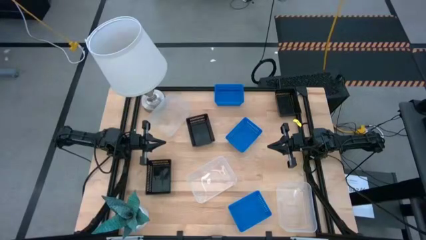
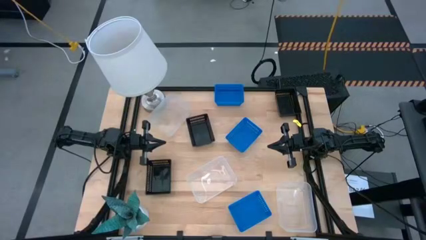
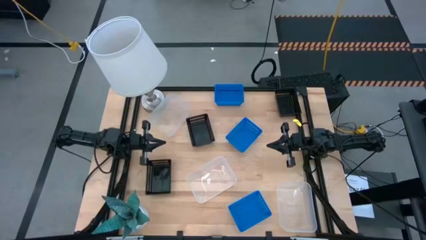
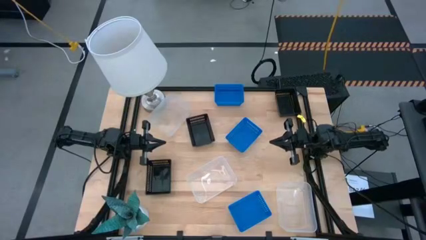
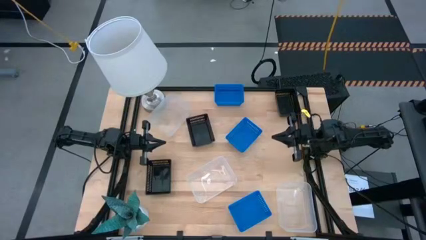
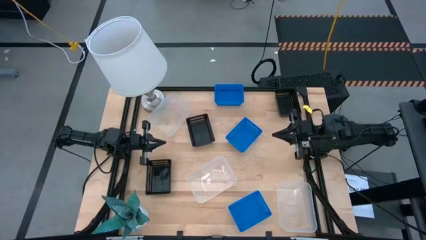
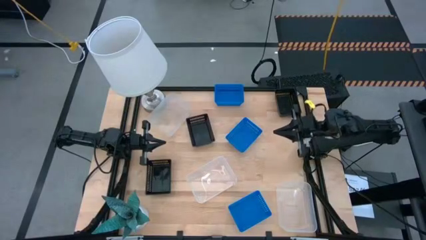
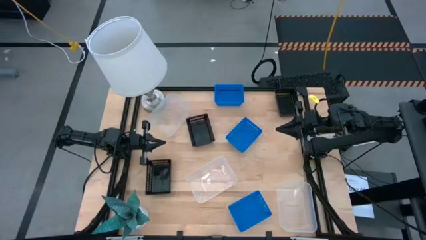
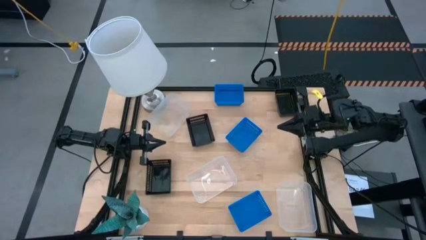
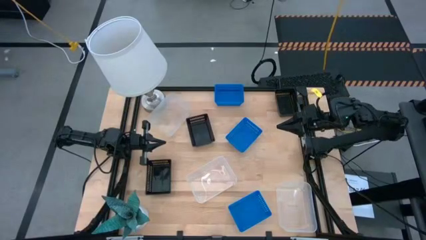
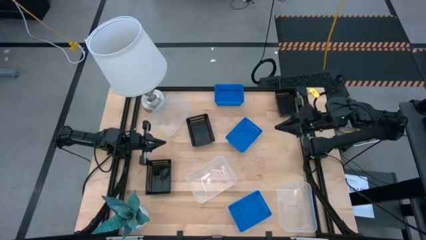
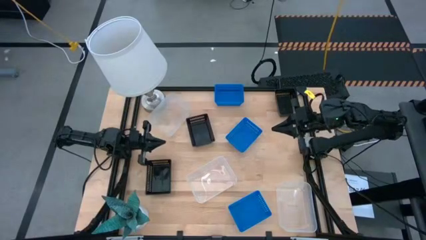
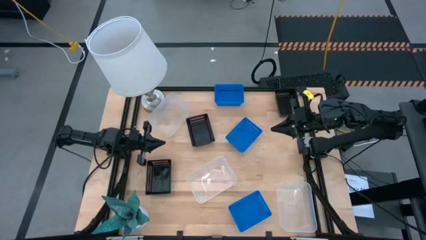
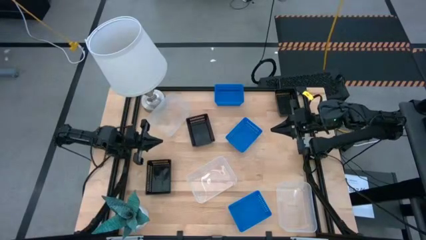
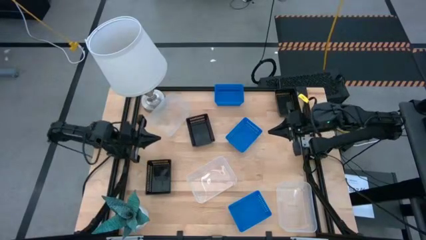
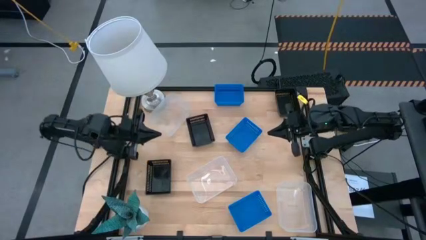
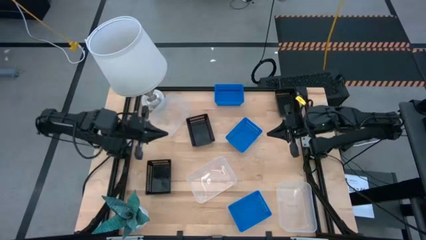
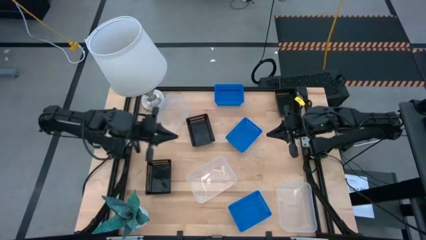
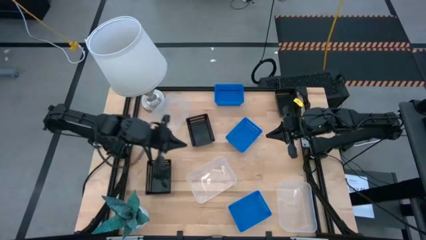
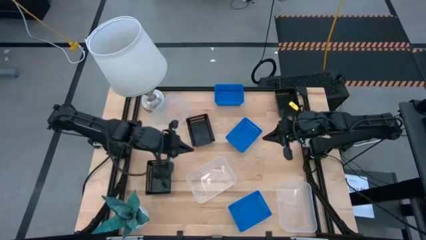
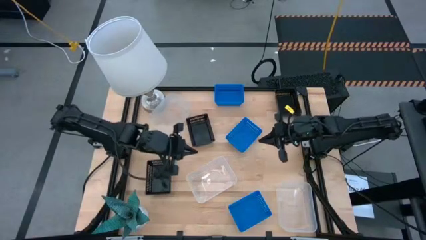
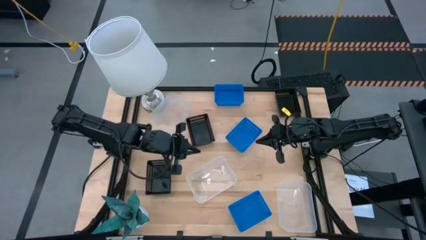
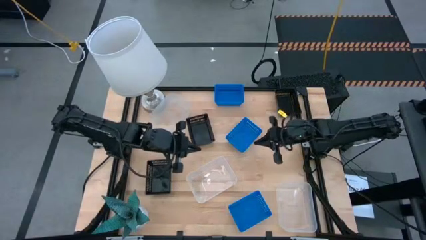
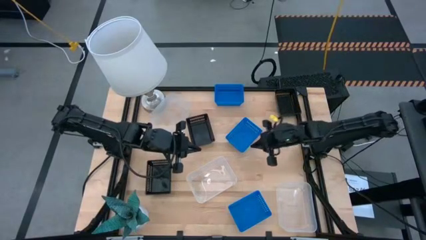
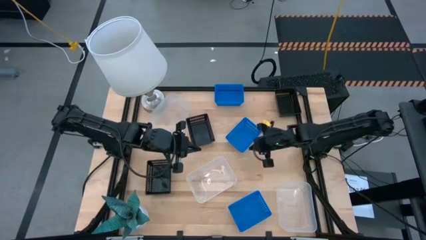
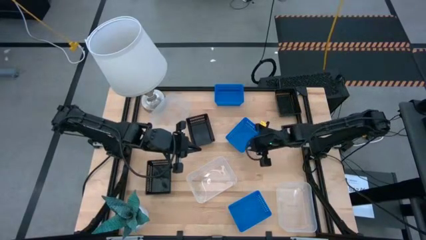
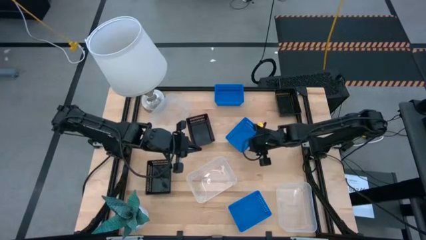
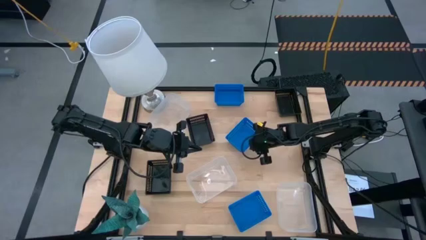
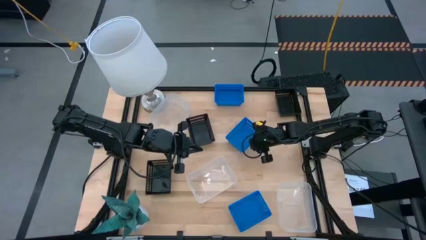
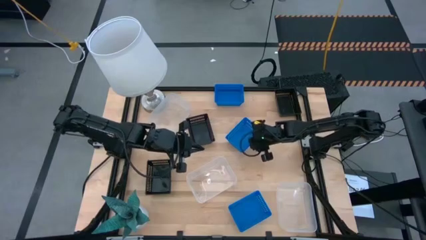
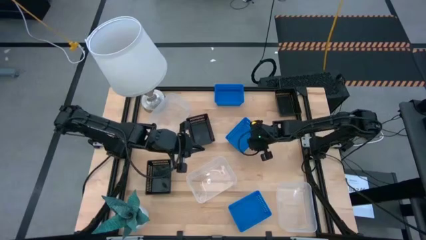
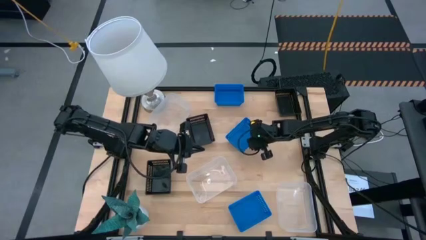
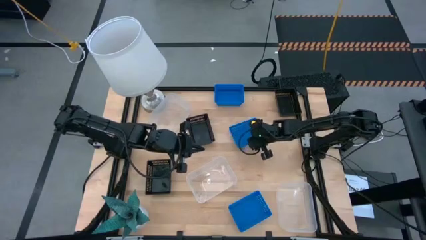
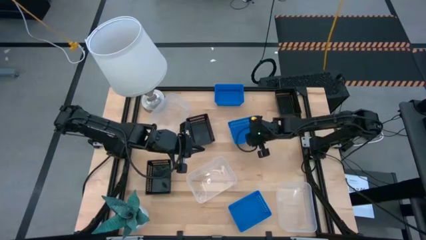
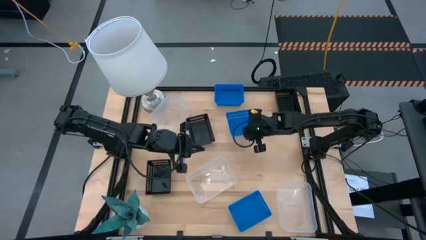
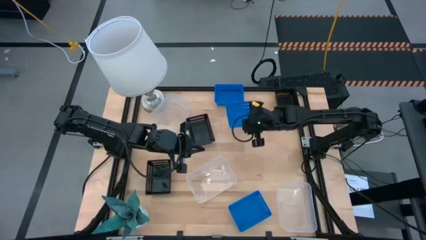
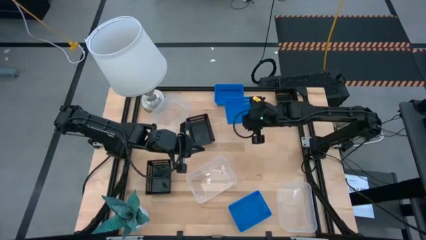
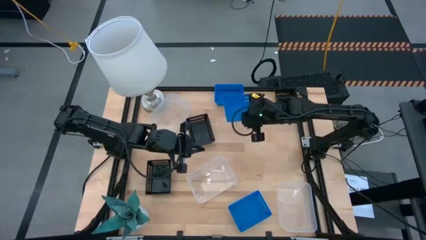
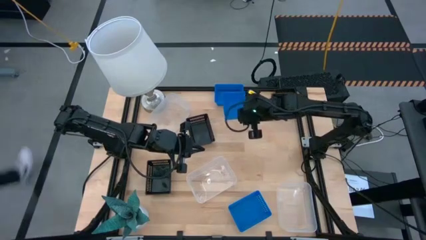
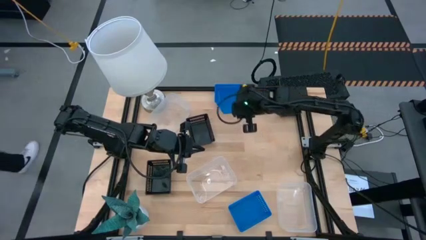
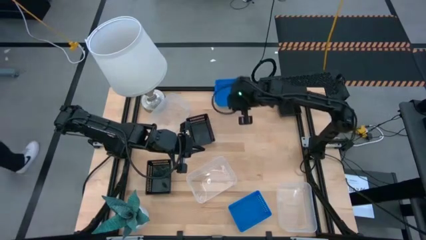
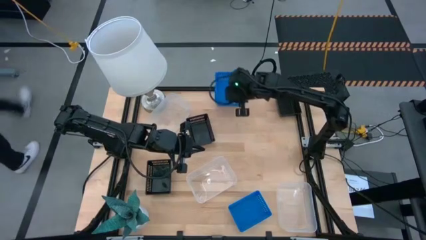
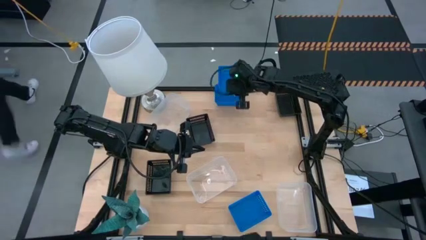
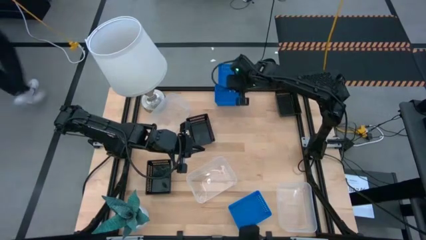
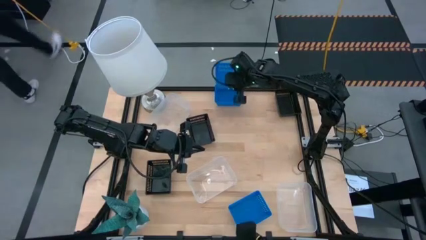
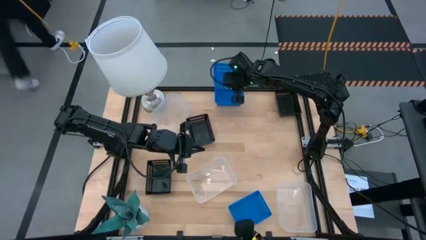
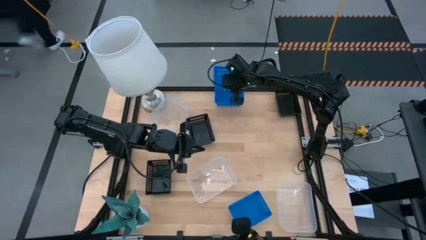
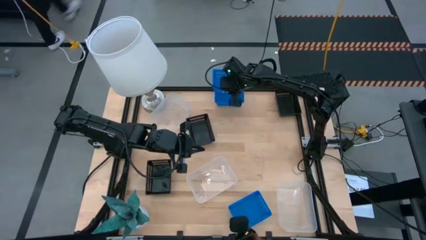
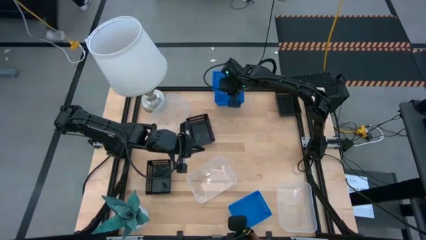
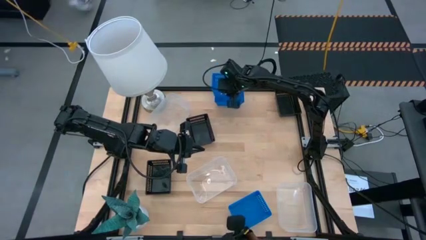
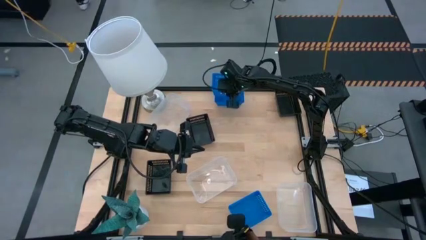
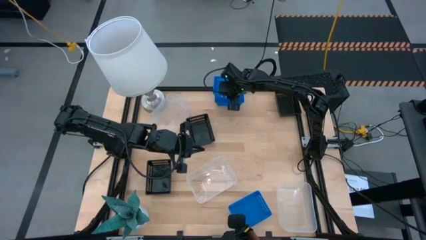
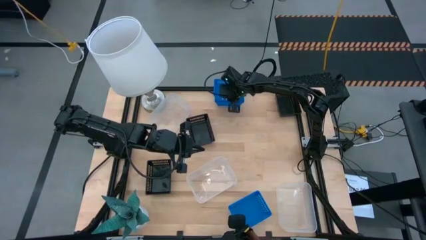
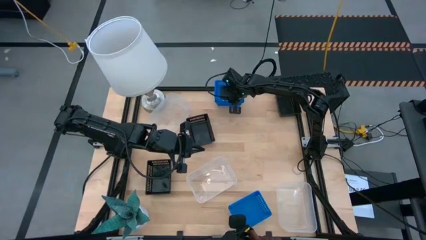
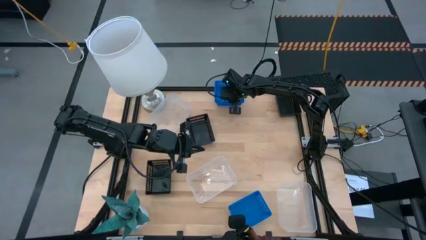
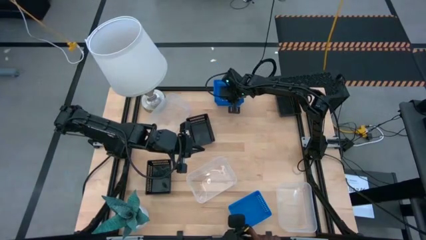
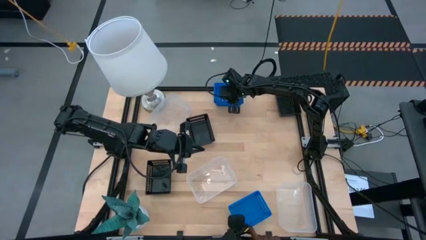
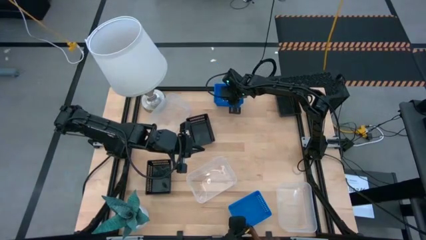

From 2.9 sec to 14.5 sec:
Stack the middle blue bin on top of the top blue bin

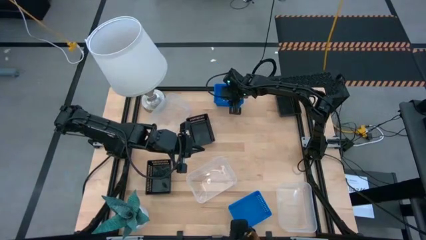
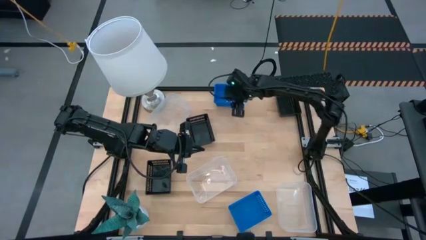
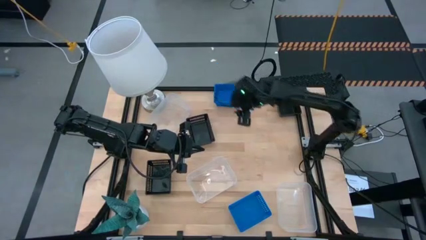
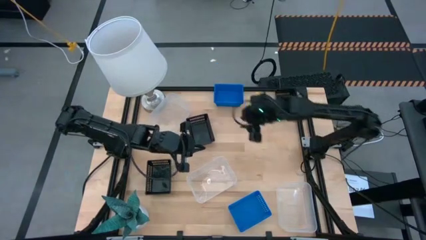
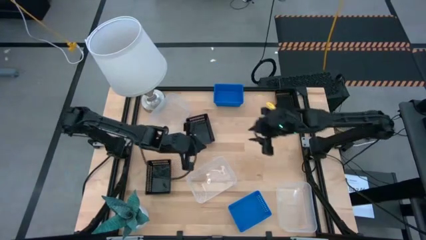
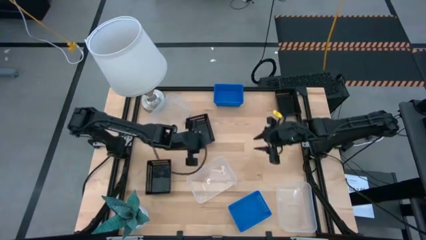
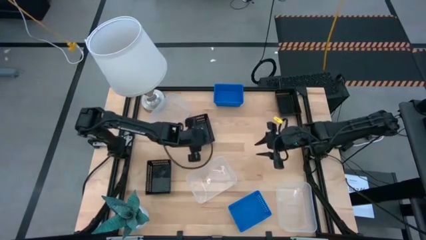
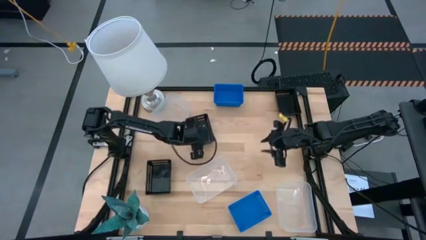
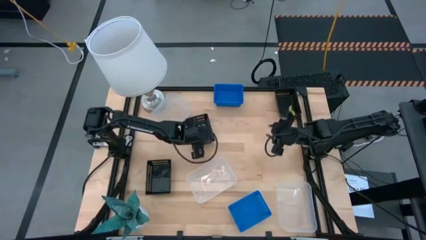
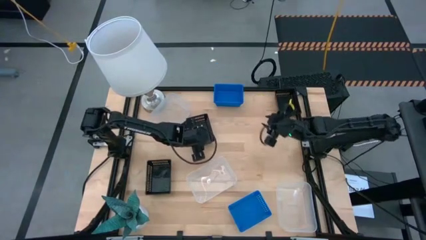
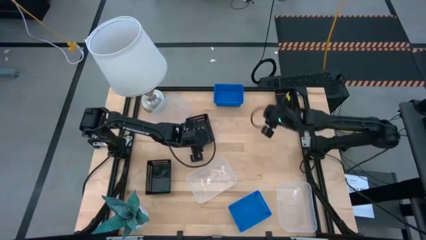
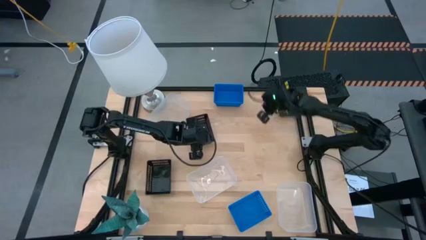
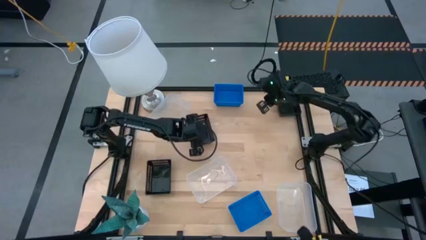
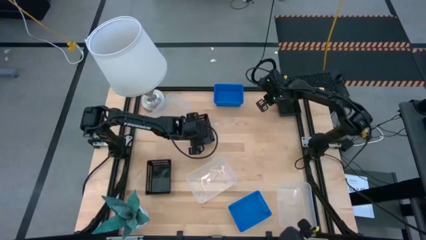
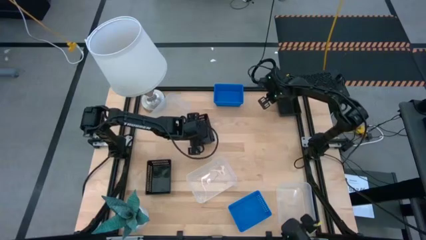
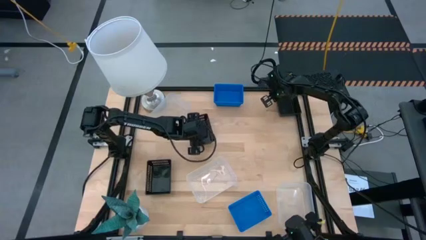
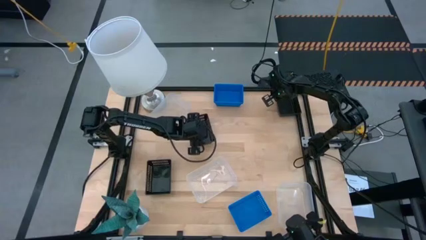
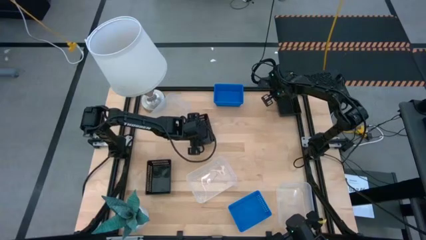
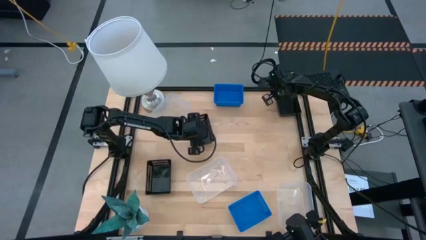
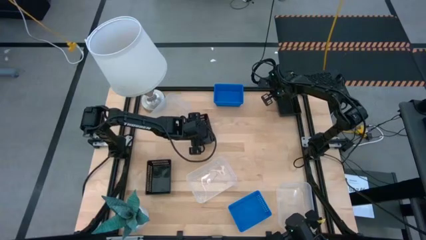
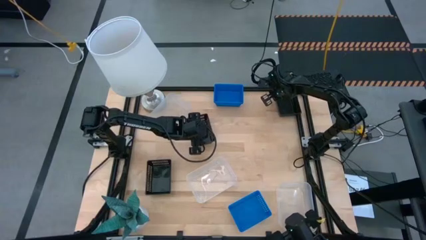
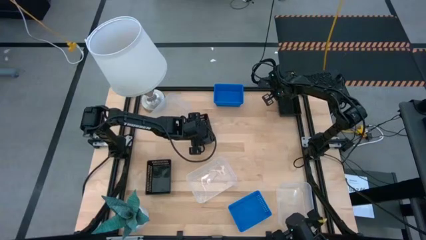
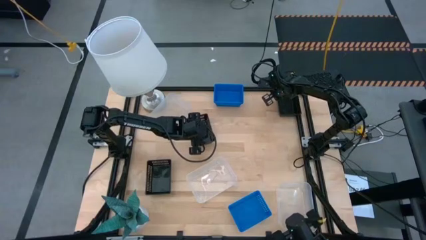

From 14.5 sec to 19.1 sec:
Adjust the top black bin
